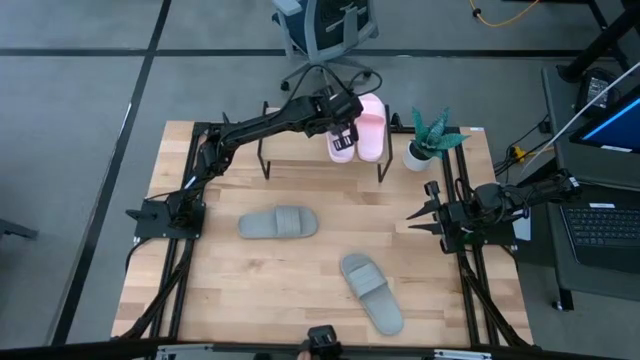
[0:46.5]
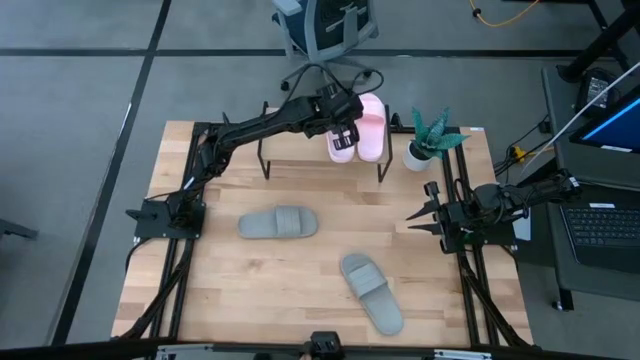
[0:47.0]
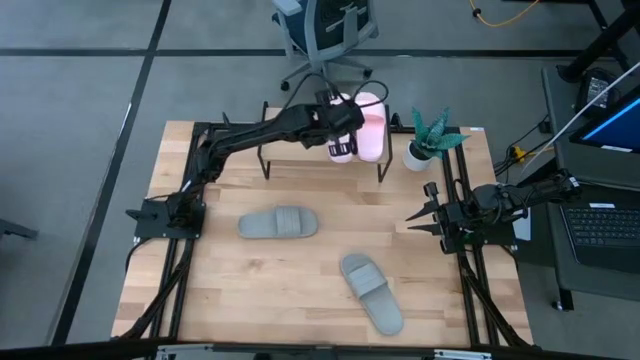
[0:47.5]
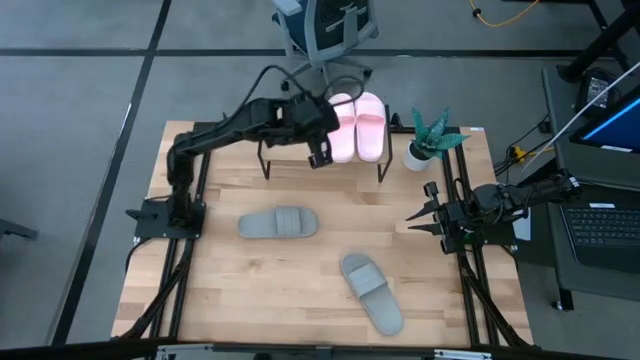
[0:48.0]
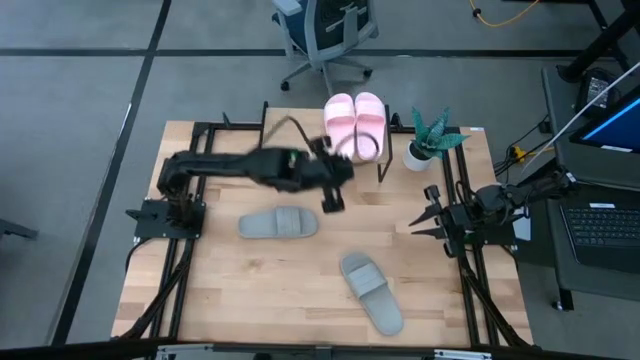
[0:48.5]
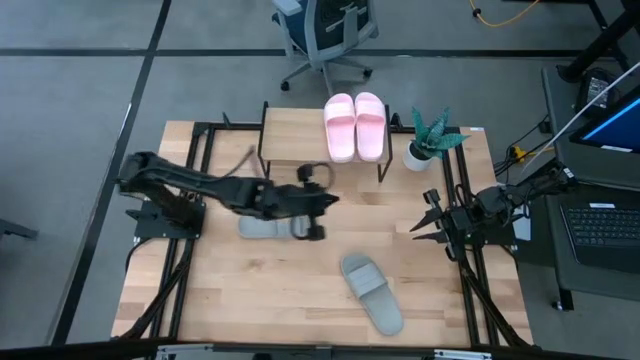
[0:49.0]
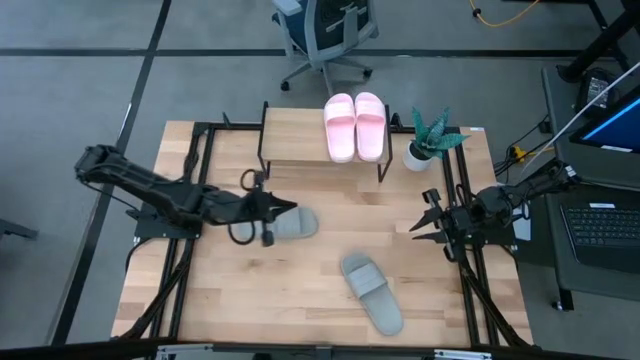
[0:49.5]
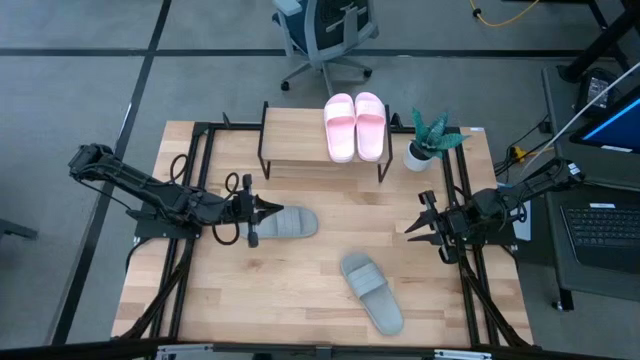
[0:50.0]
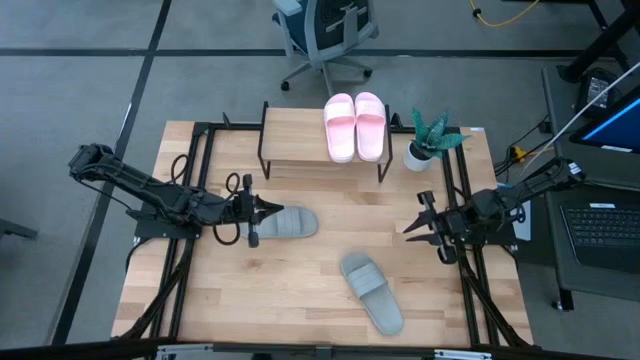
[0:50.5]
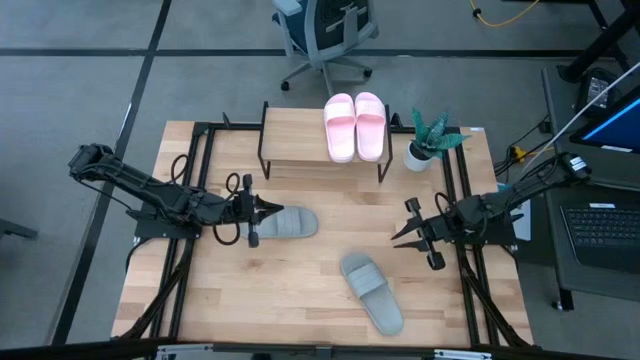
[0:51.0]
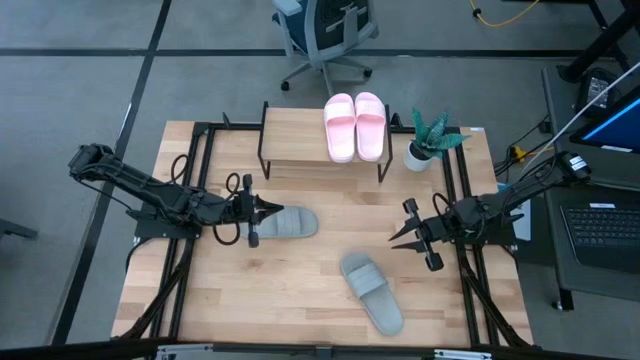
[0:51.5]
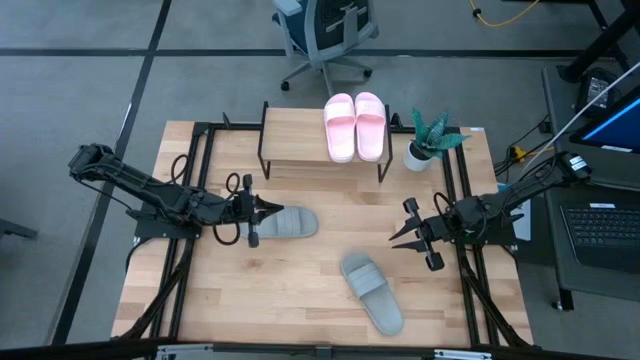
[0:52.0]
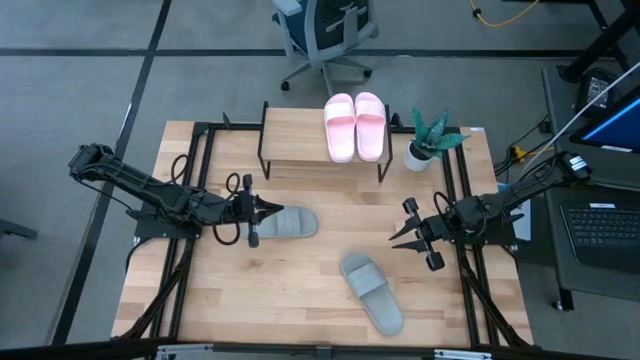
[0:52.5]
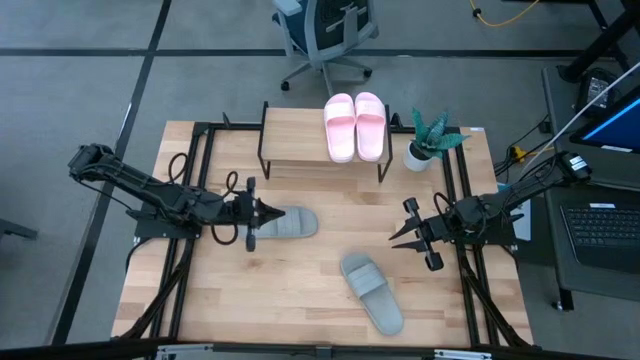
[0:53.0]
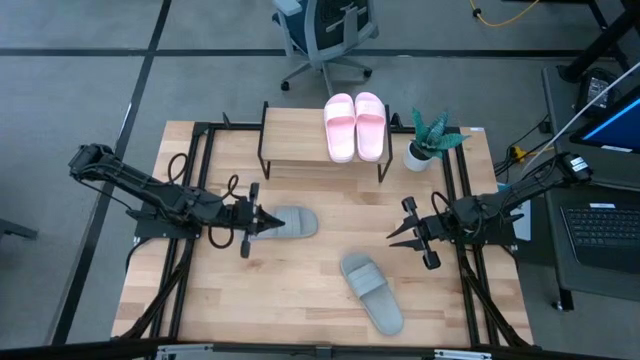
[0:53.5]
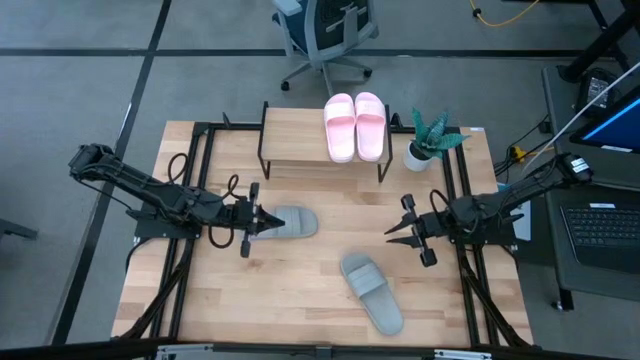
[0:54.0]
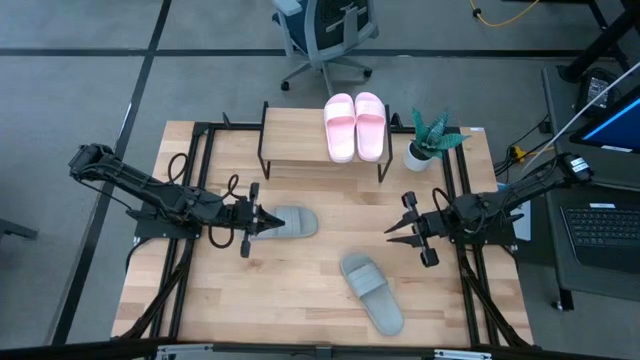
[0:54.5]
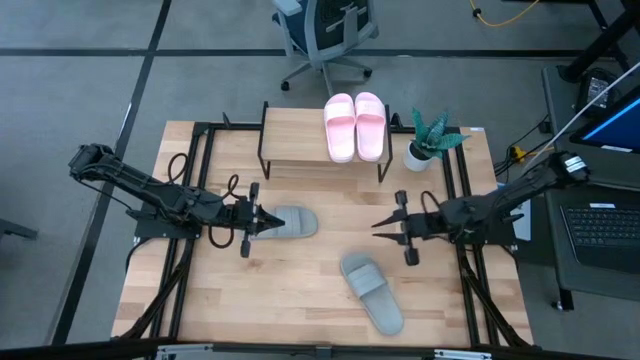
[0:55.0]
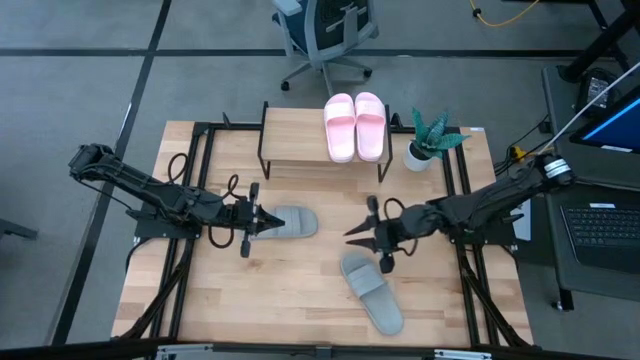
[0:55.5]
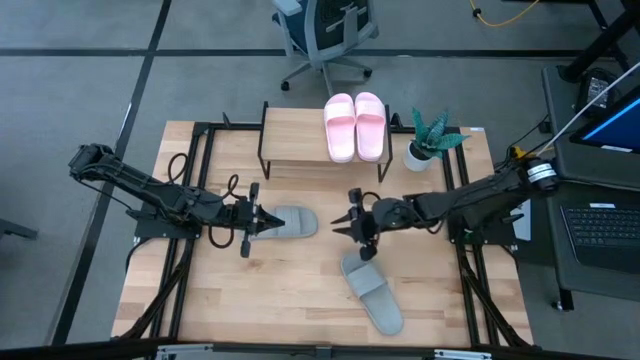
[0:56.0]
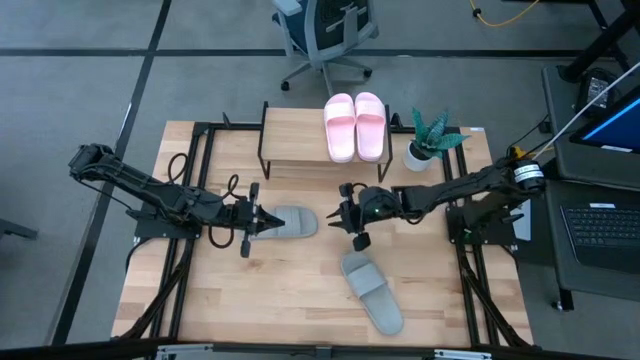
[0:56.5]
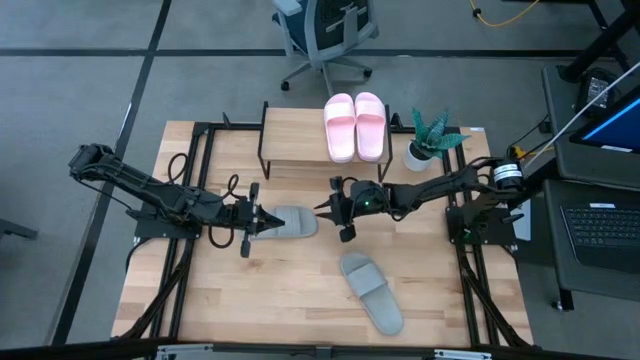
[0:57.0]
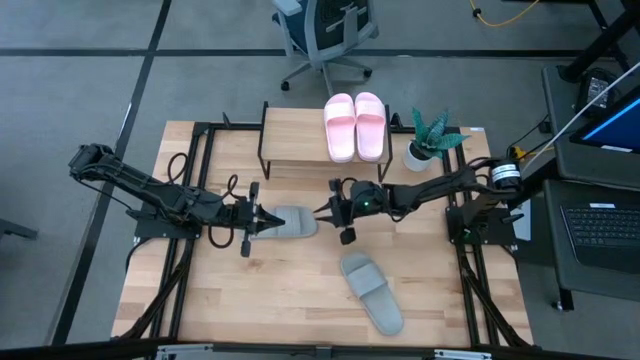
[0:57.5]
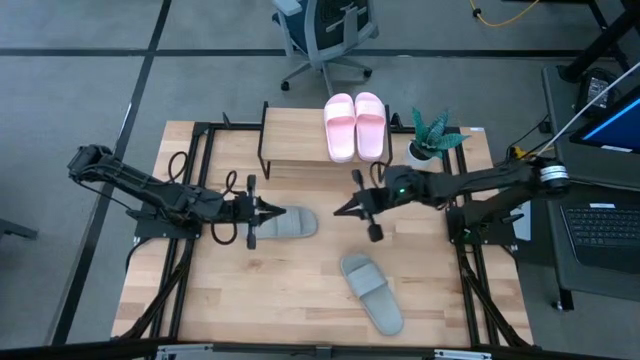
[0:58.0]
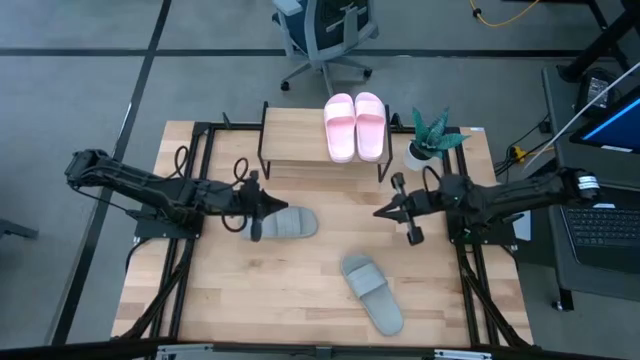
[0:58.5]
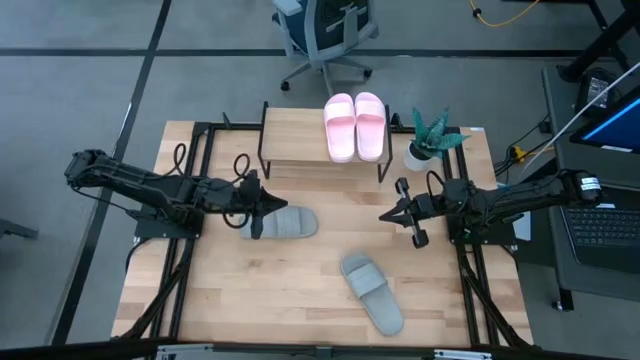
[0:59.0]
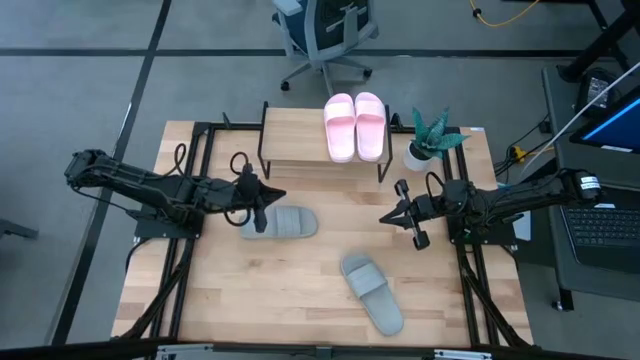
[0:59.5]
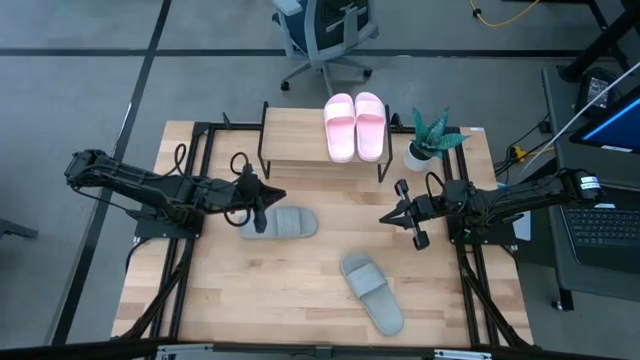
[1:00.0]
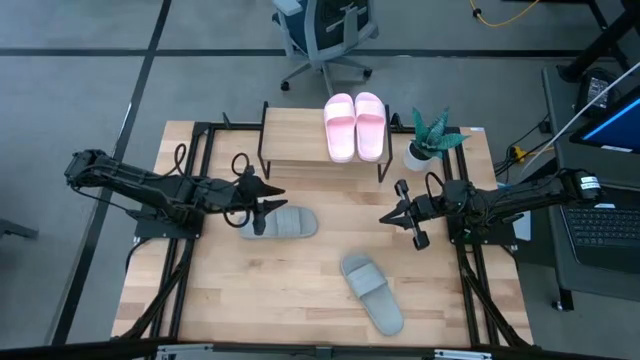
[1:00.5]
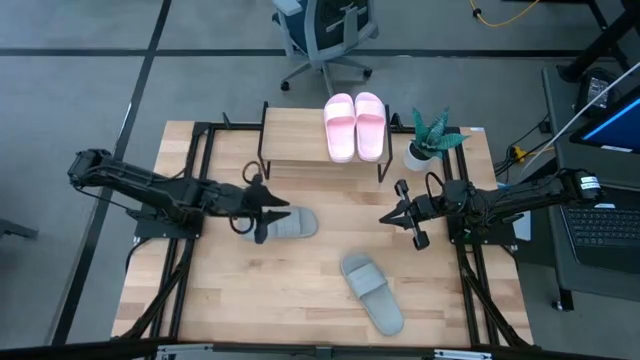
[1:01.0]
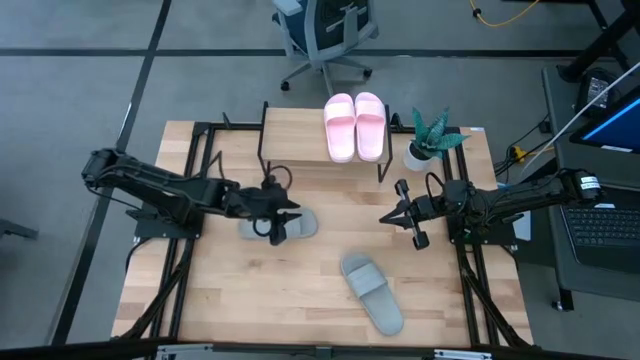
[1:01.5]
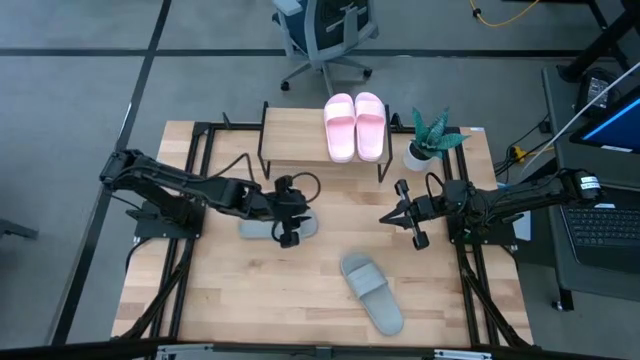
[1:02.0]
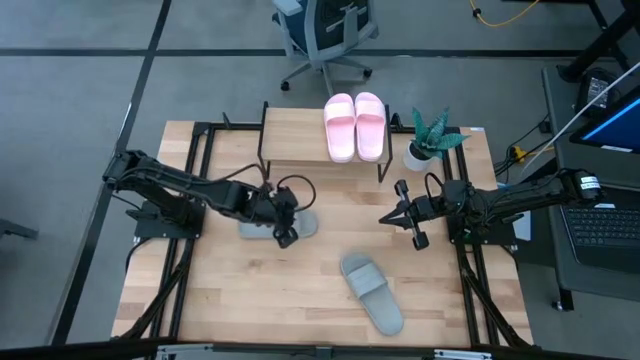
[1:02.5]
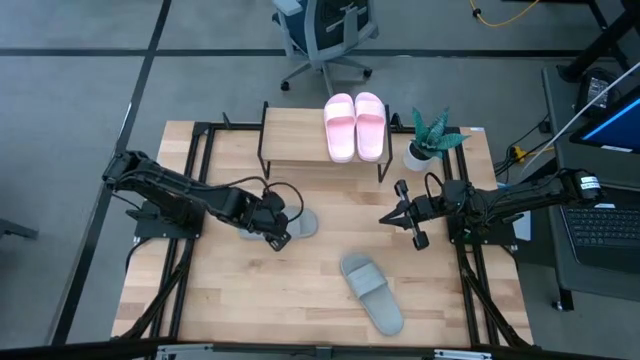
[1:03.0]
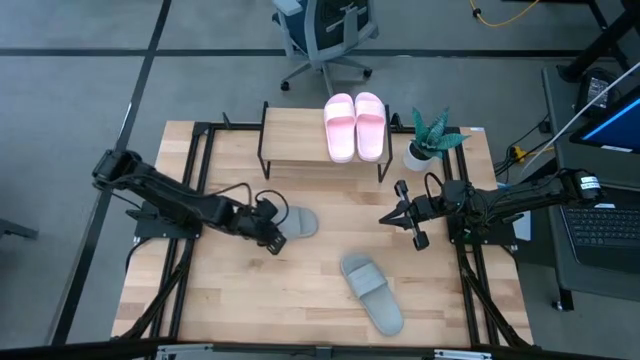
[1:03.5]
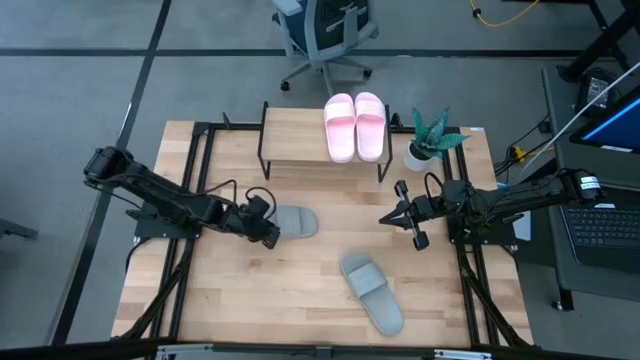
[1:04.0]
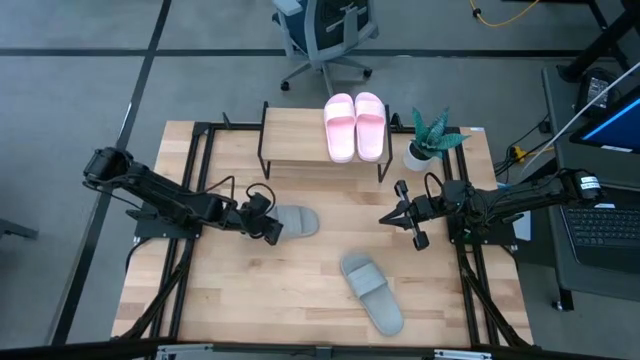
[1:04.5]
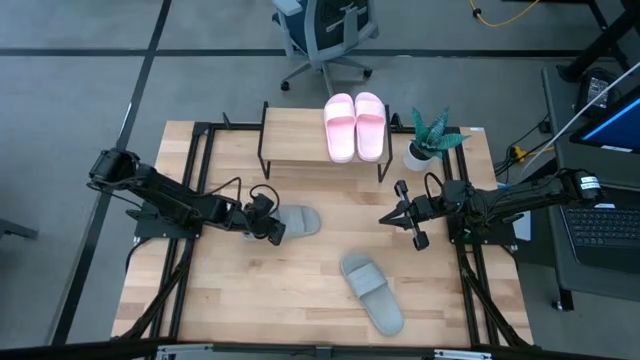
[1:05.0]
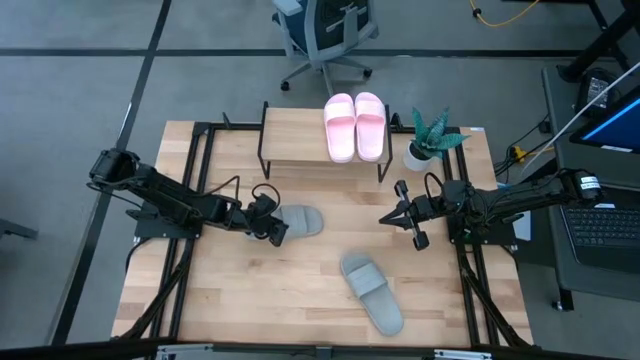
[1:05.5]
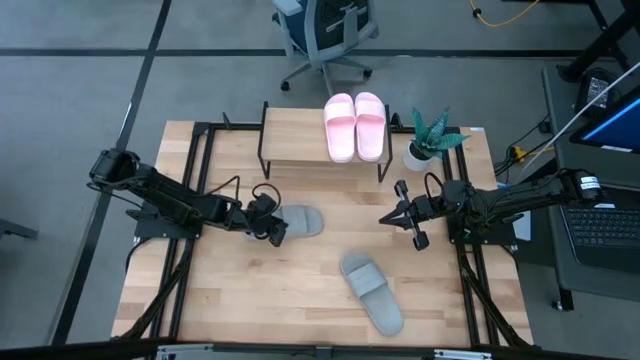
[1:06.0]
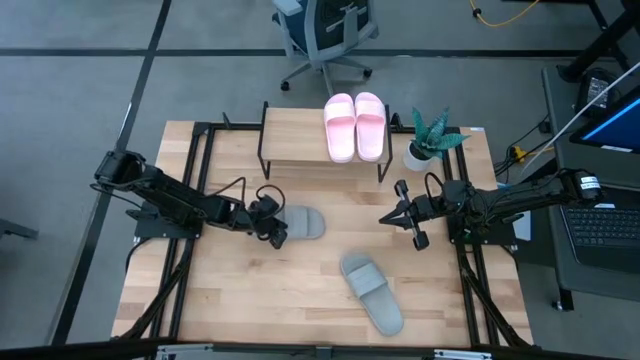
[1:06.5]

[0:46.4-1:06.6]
Task: Pick and place slides into the shelf
Put the left gray slipper on the shelf

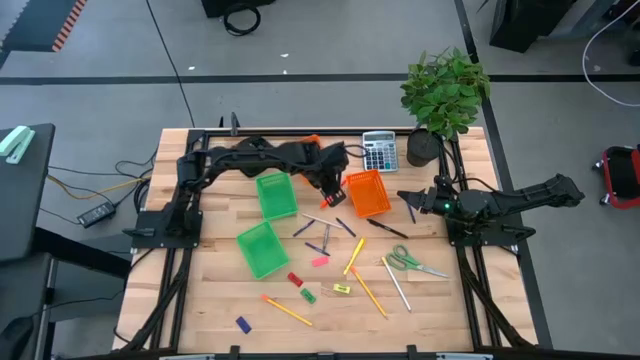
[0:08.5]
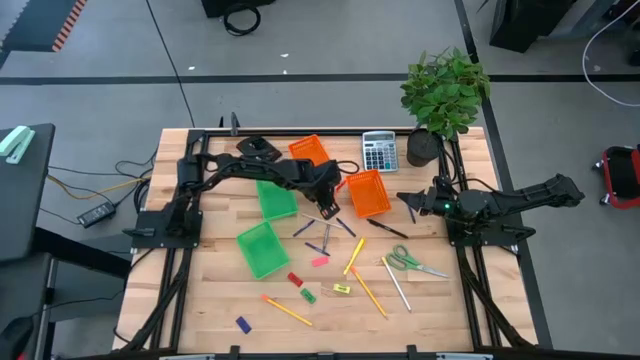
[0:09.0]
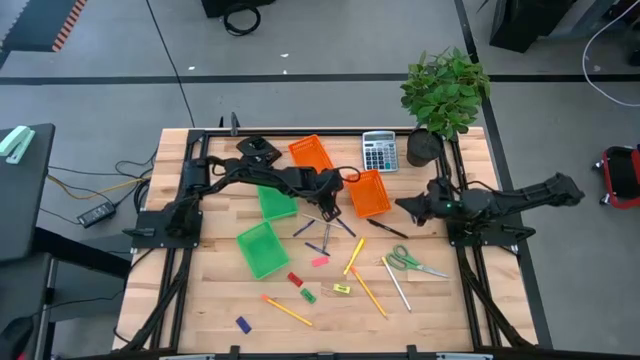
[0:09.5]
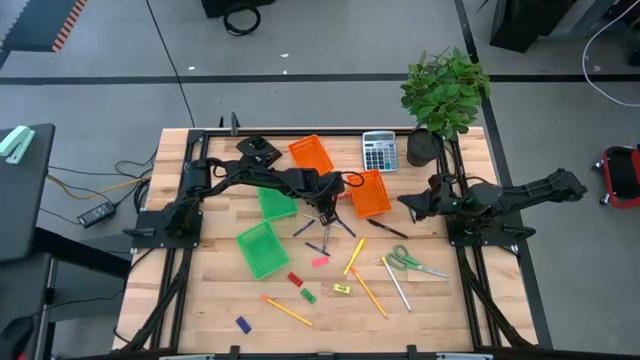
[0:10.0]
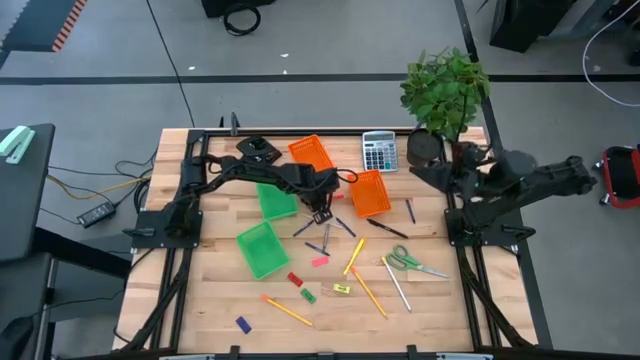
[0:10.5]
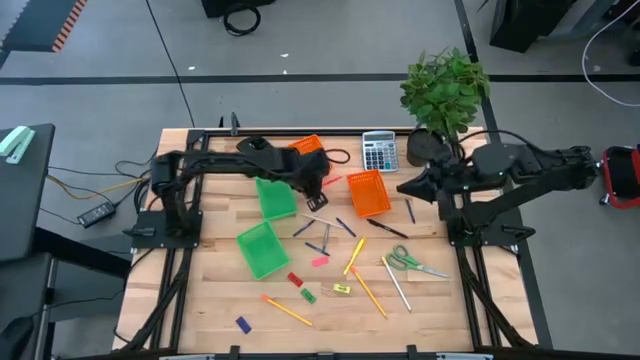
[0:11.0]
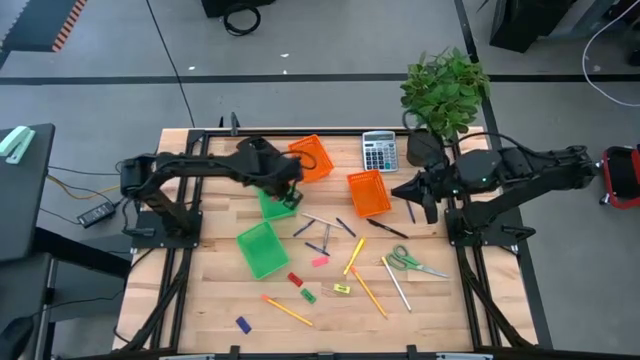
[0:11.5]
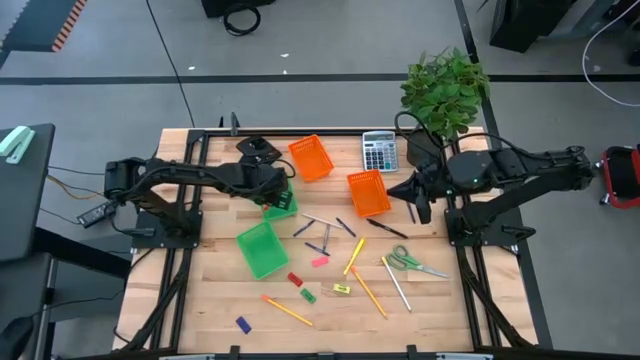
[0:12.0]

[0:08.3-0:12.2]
Task: Sort crayons/erasers/pens/pencils in bins
Put the orange pen into the top green bin
